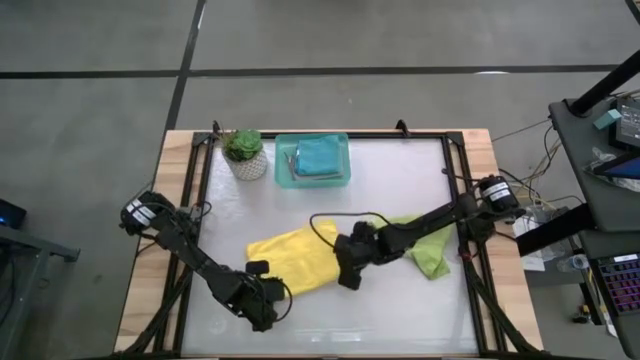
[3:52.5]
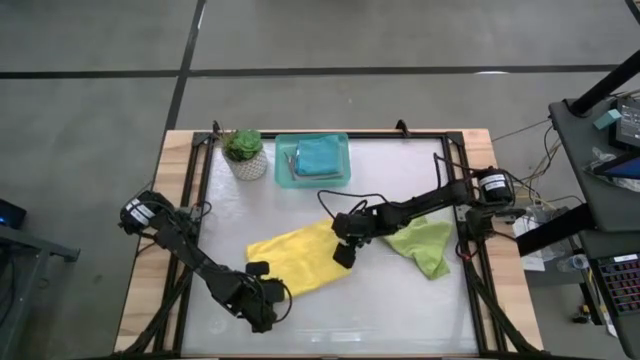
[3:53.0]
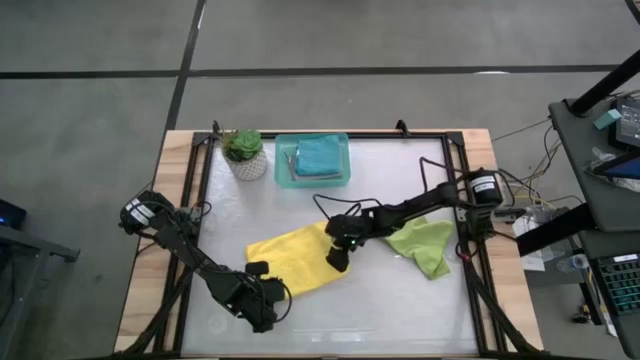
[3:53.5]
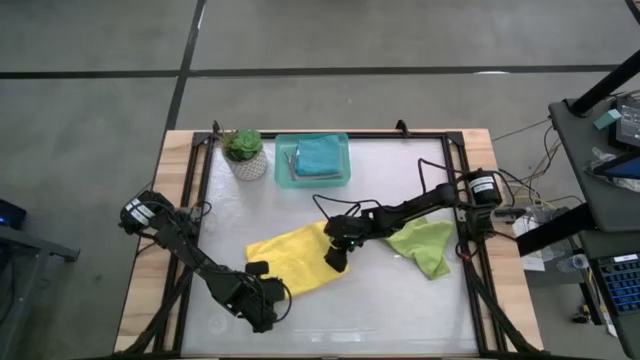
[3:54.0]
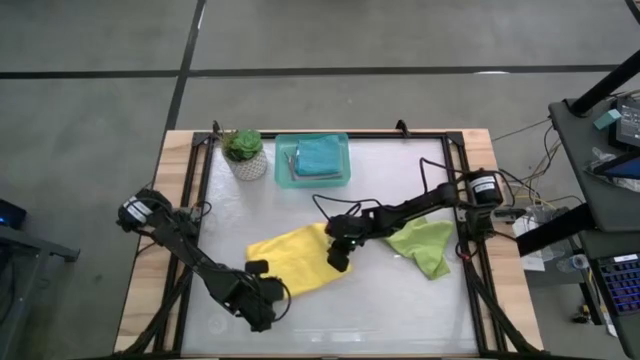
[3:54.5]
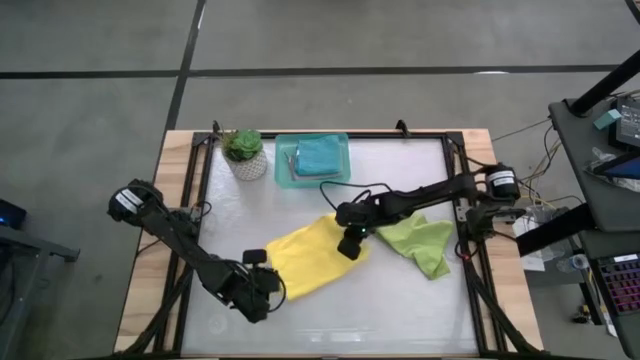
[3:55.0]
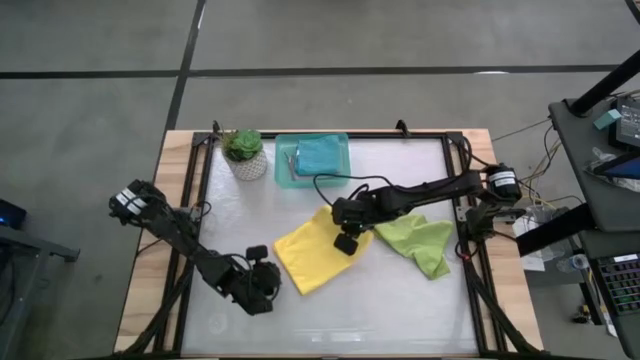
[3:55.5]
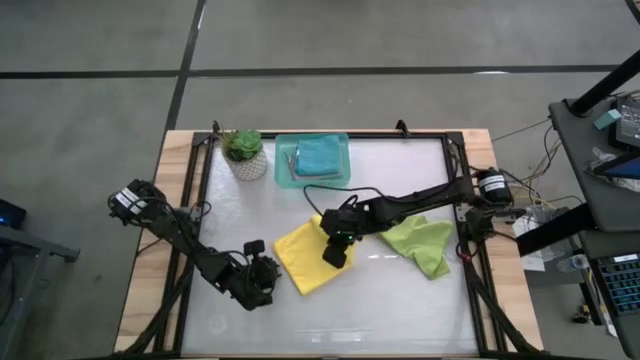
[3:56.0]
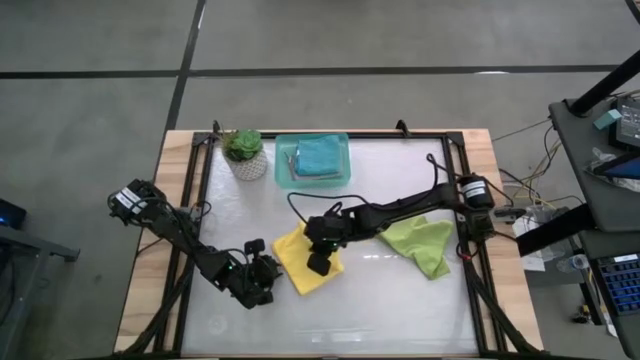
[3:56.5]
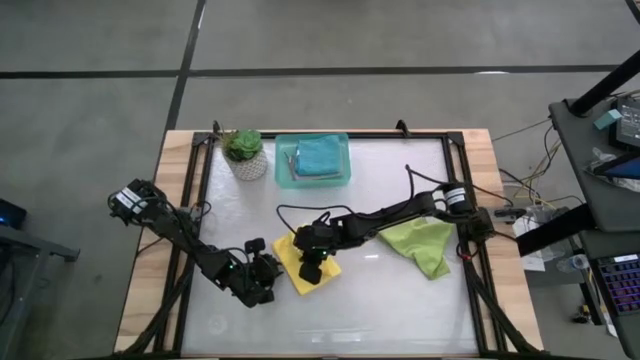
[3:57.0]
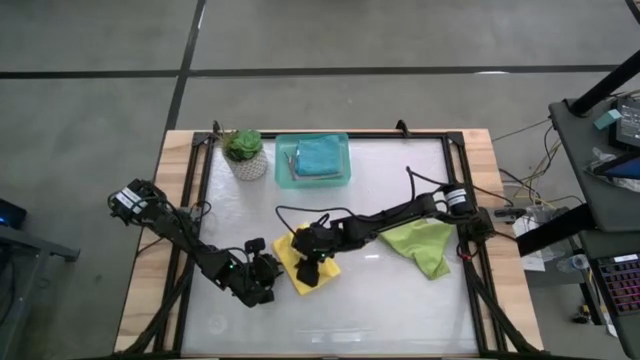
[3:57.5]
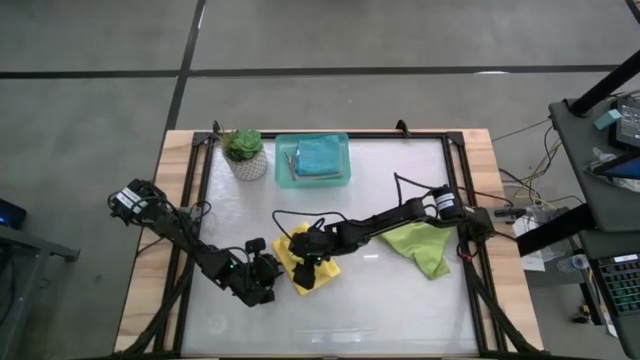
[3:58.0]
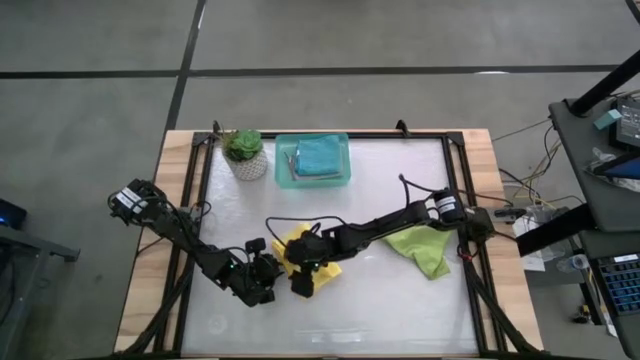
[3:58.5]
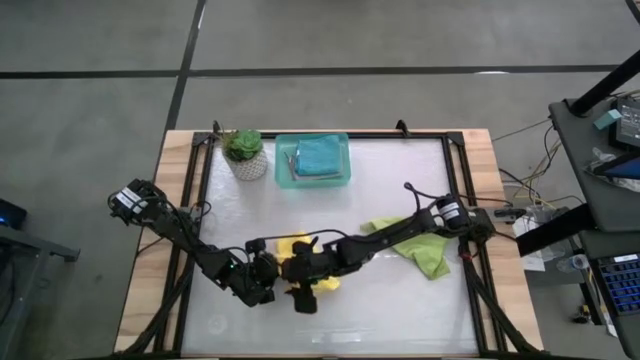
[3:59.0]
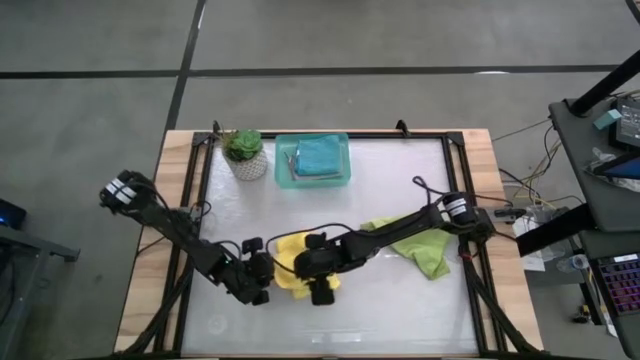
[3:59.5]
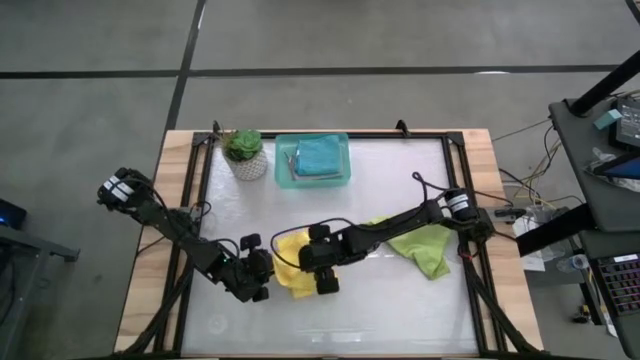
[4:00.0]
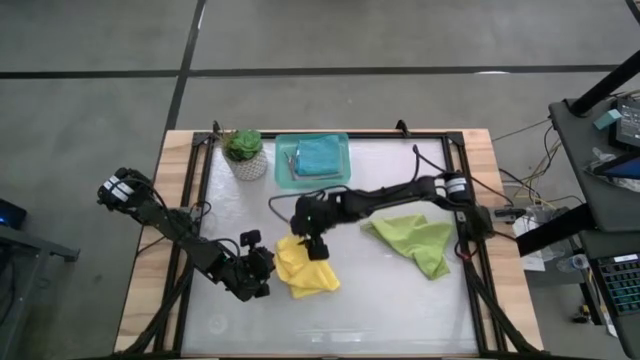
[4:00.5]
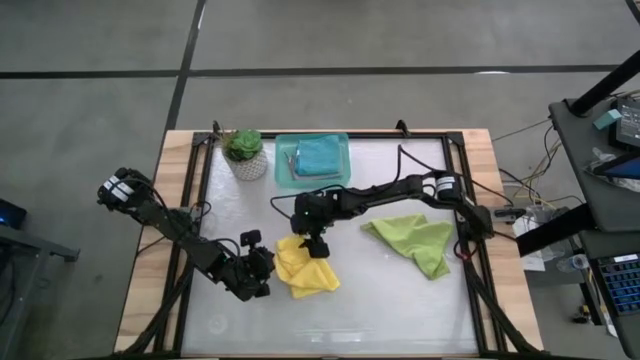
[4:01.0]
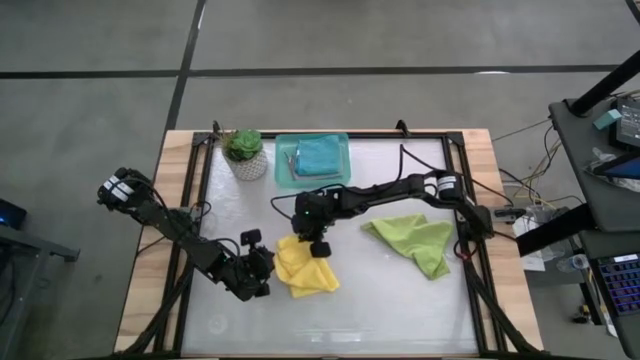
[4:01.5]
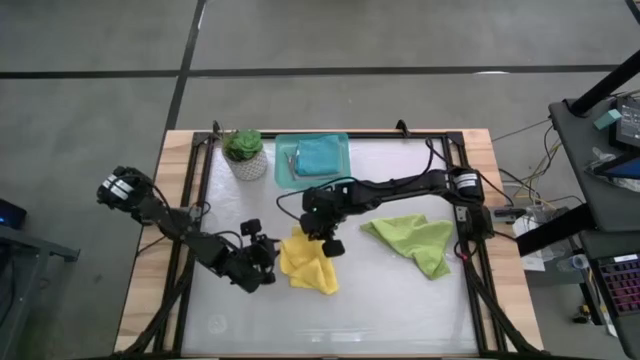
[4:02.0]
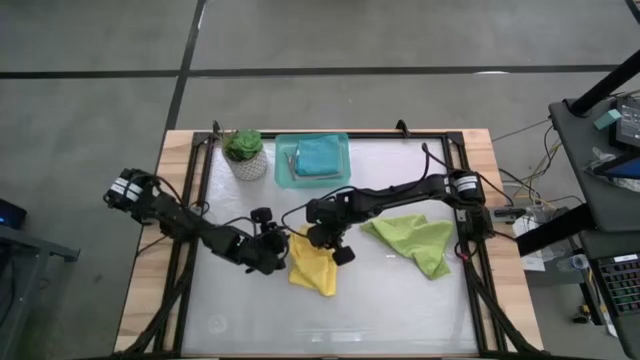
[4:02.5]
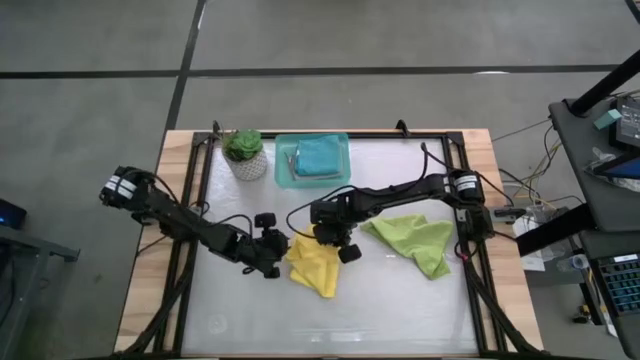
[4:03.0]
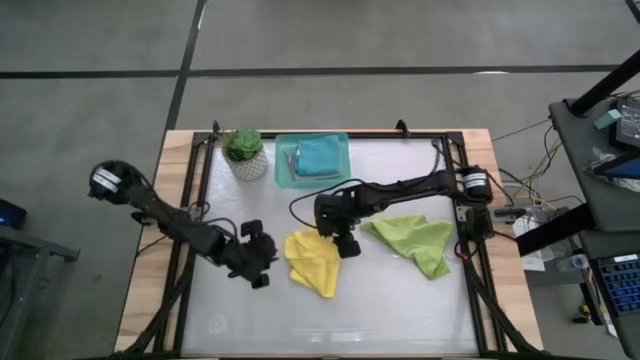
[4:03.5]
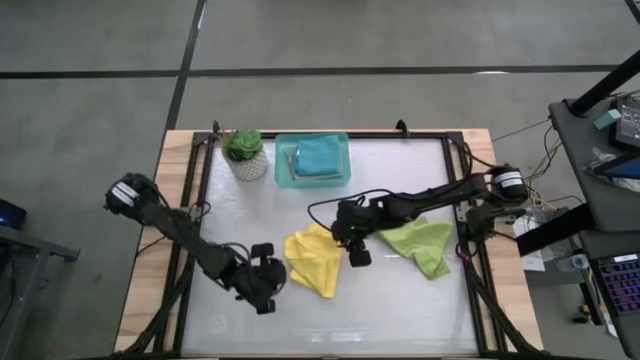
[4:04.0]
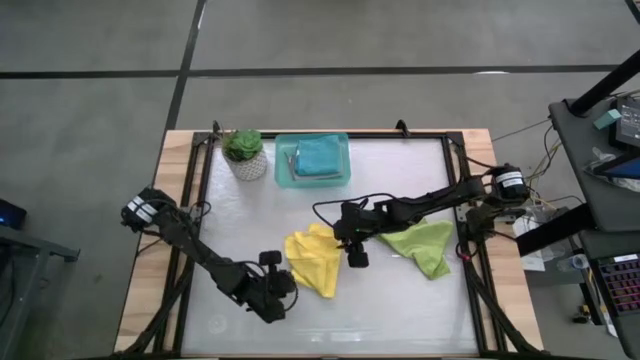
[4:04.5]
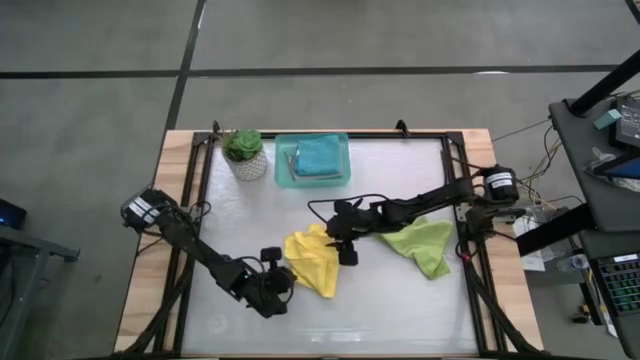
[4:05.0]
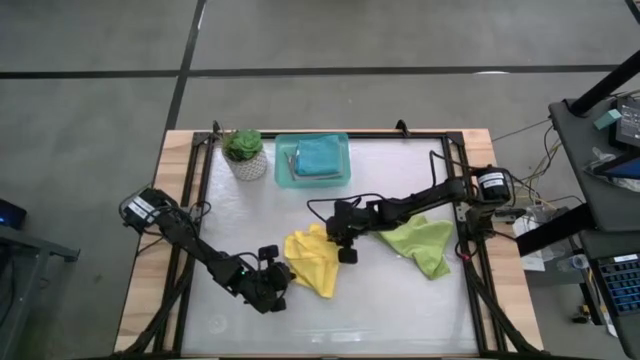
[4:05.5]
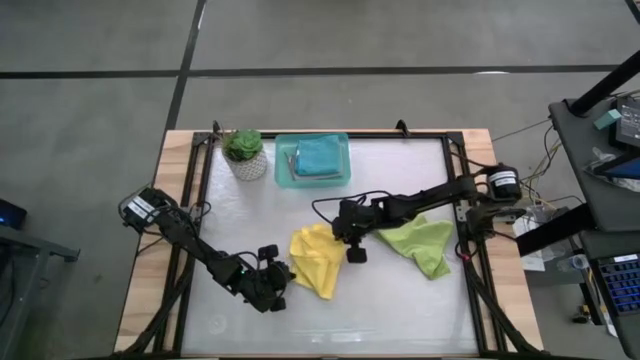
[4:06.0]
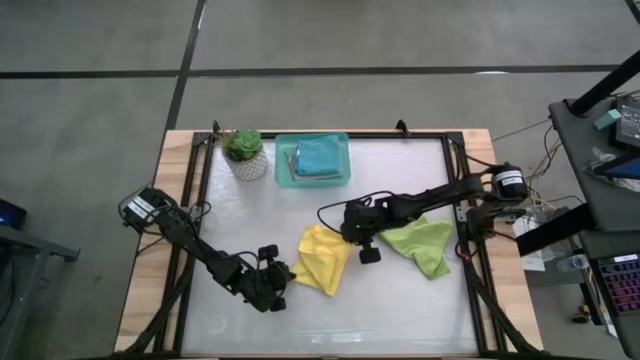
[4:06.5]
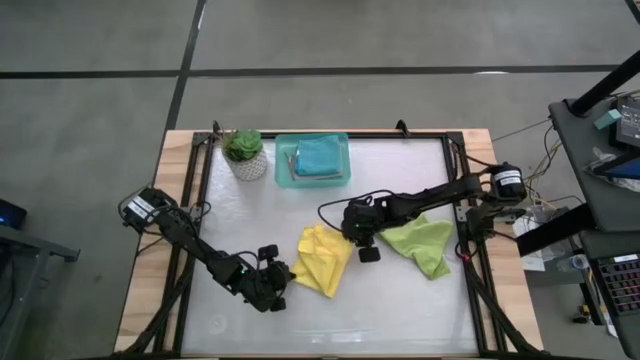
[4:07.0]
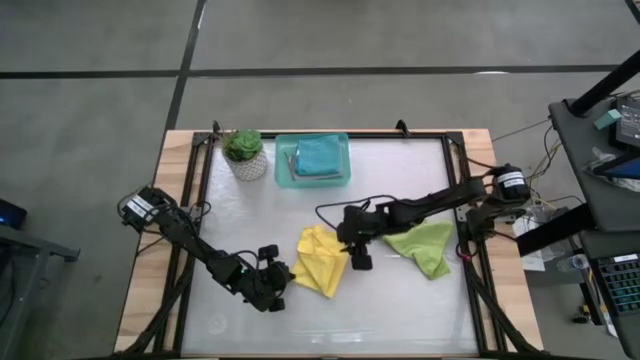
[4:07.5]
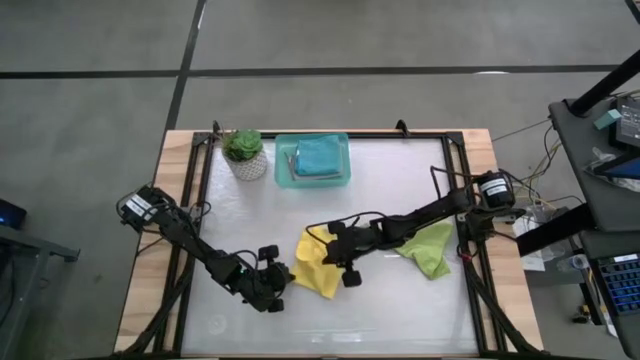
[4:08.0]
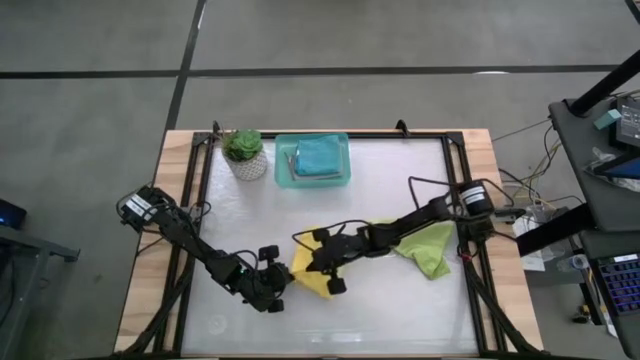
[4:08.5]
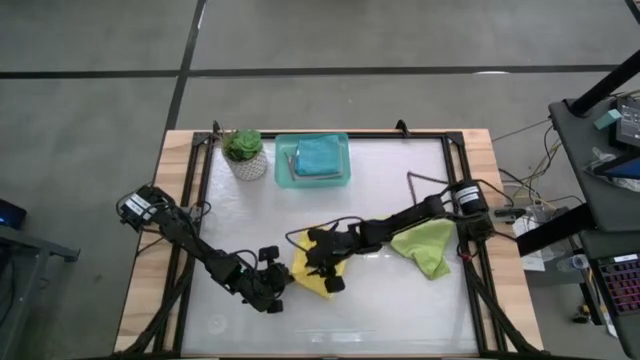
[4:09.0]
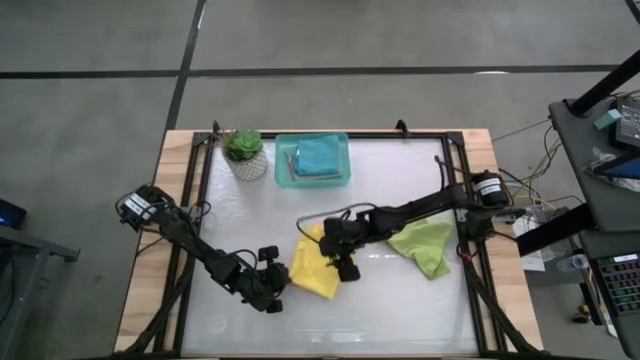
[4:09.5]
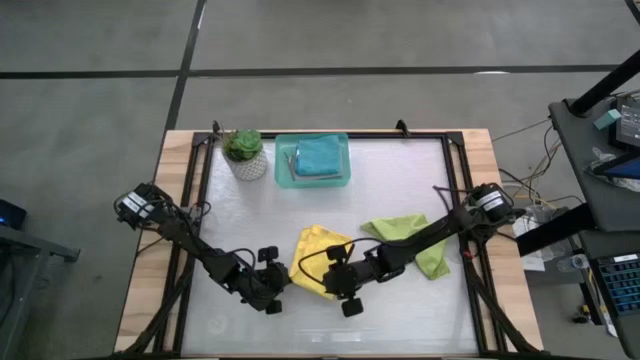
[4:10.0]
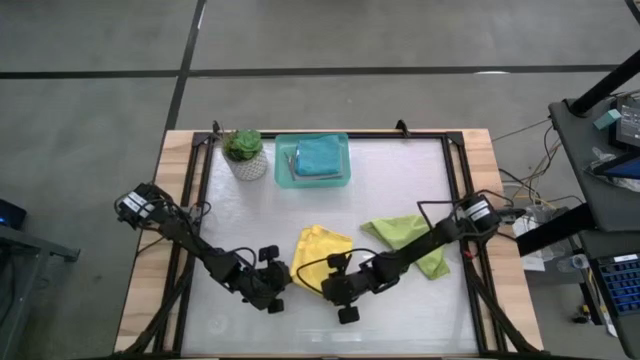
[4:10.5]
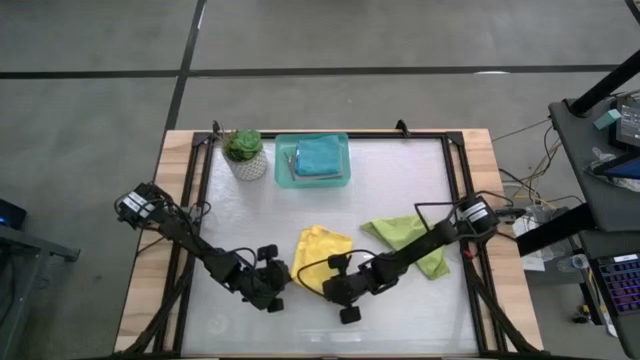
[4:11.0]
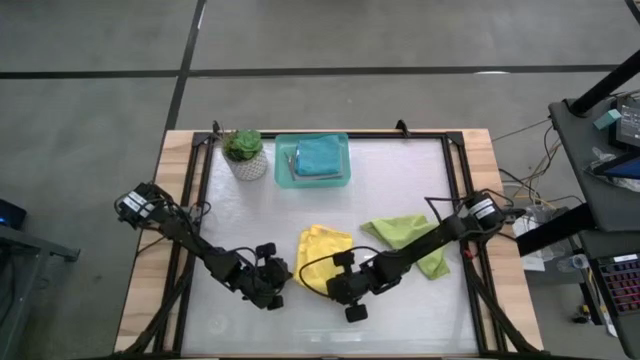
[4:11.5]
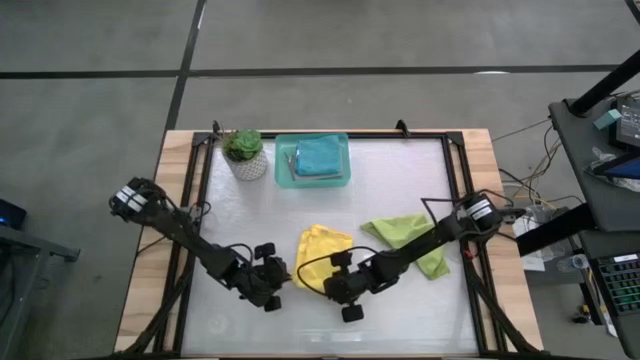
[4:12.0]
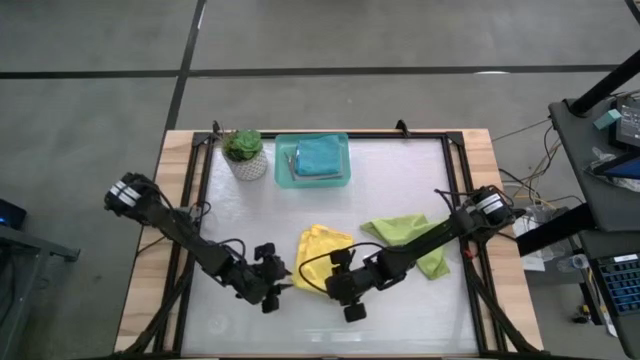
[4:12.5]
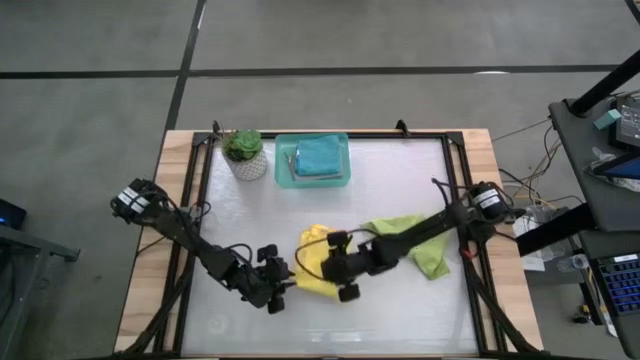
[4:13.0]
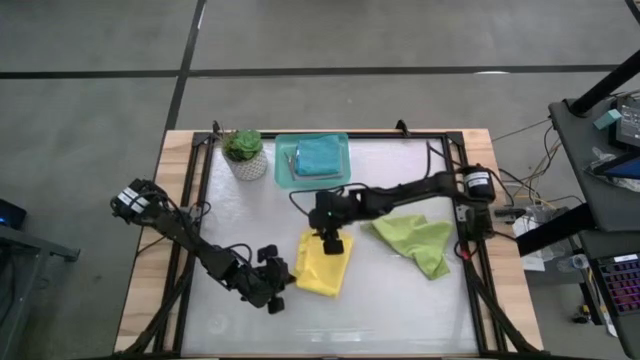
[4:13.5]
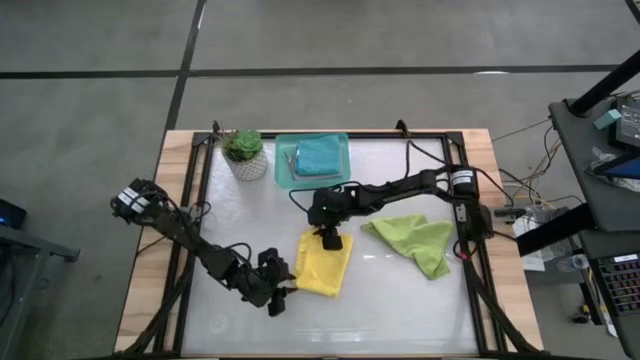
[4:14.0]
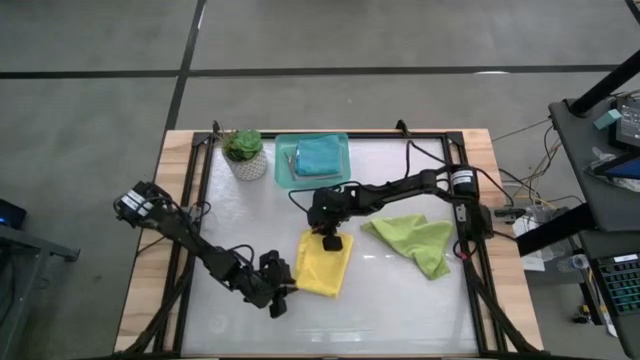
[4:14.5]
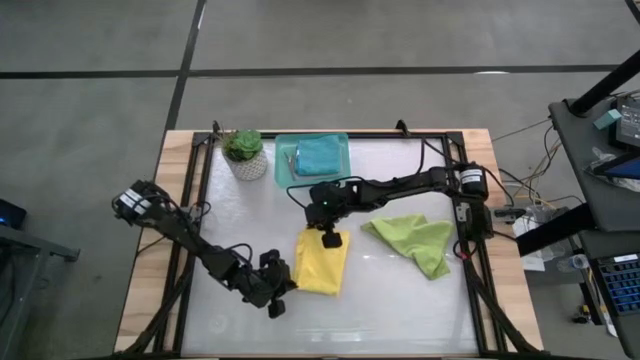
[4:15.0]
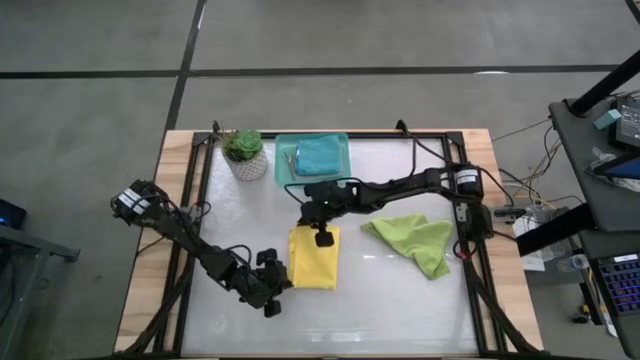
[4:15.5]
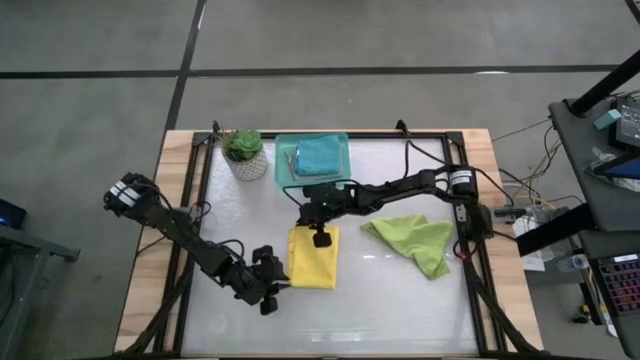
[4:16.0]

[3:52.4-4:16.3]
Task: Fold microfiber towels
Fold the yellow microfiber cloth
